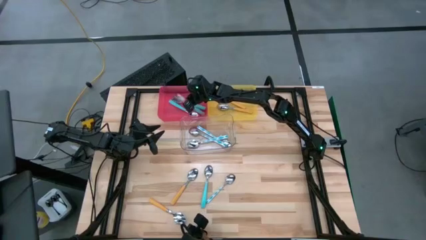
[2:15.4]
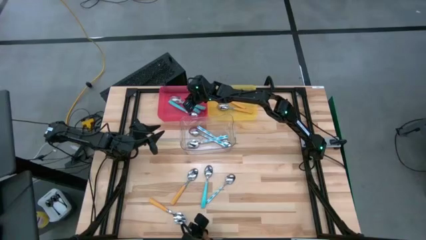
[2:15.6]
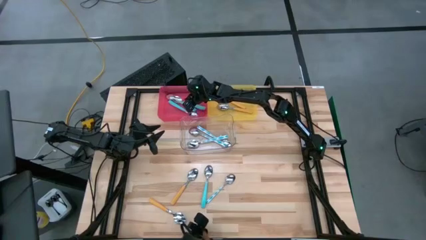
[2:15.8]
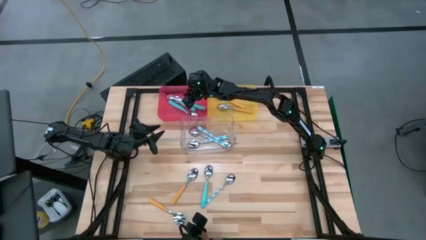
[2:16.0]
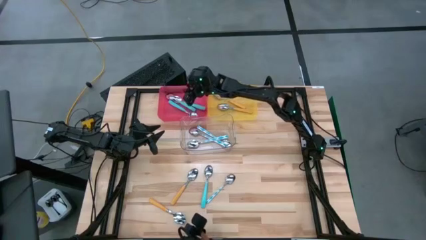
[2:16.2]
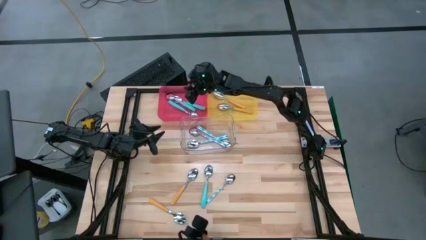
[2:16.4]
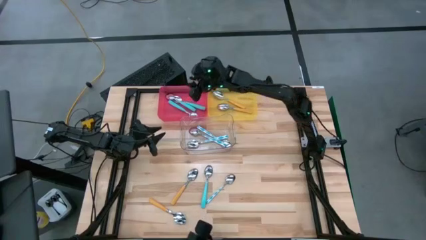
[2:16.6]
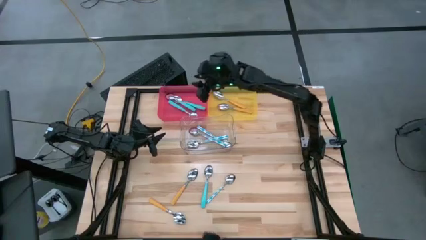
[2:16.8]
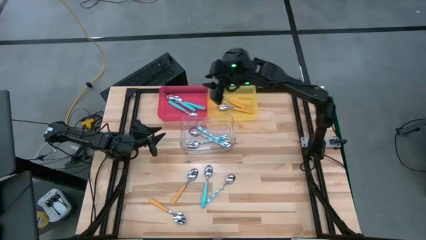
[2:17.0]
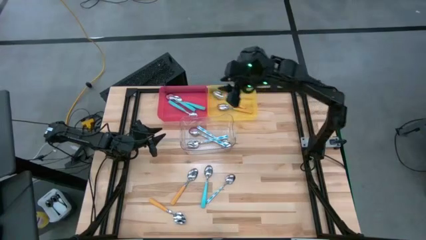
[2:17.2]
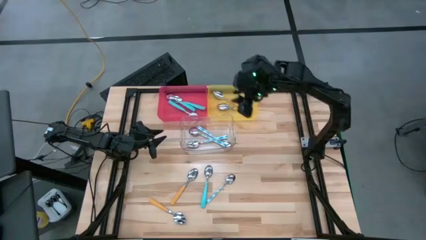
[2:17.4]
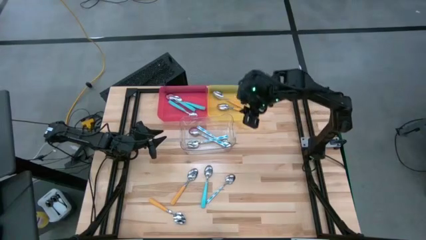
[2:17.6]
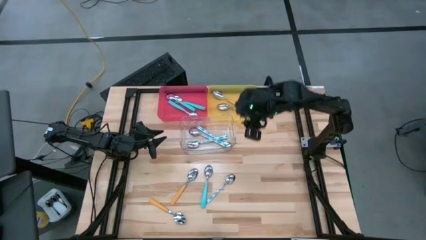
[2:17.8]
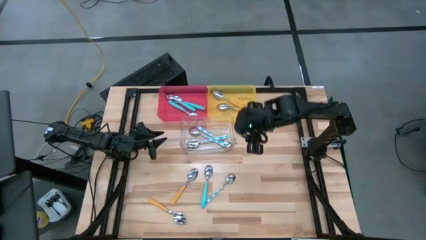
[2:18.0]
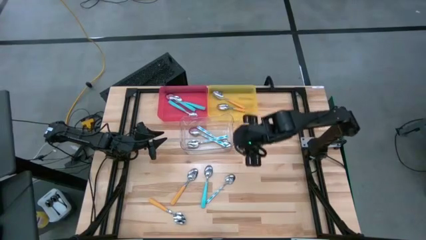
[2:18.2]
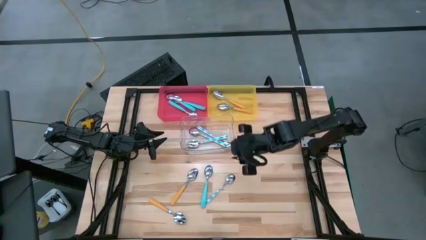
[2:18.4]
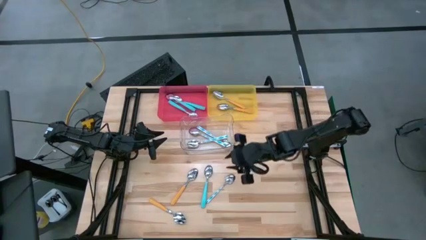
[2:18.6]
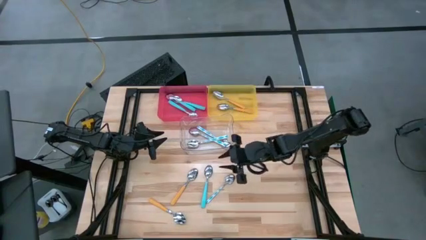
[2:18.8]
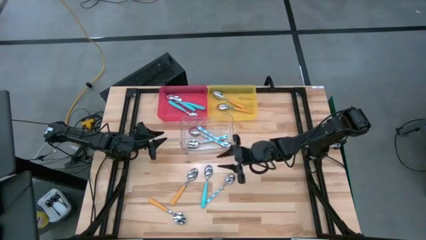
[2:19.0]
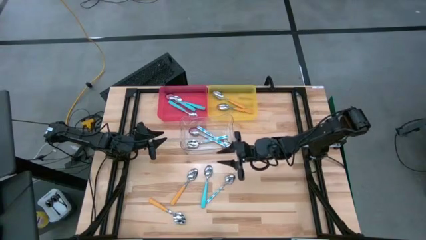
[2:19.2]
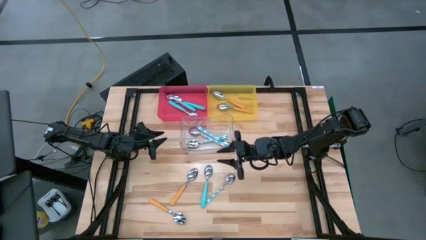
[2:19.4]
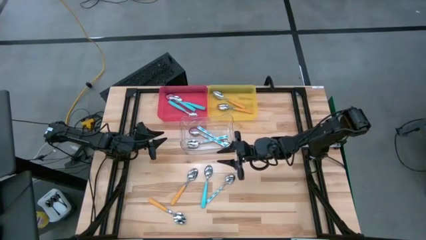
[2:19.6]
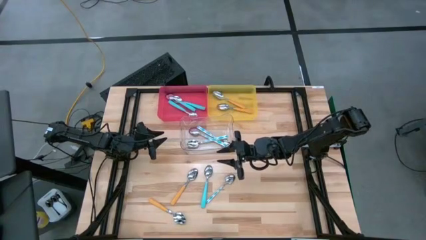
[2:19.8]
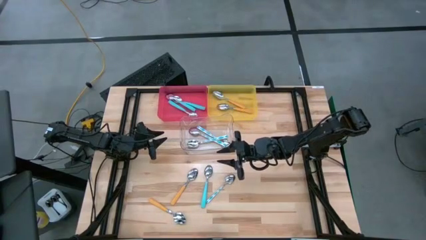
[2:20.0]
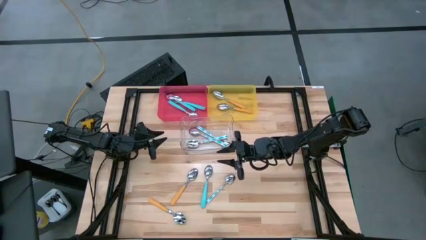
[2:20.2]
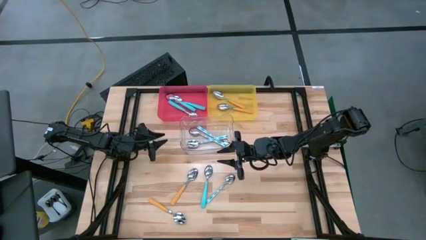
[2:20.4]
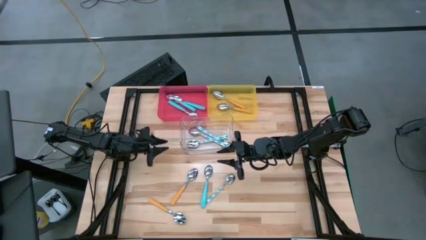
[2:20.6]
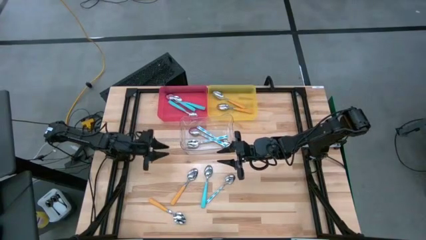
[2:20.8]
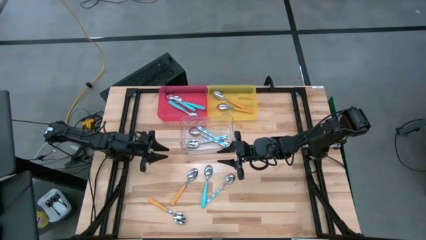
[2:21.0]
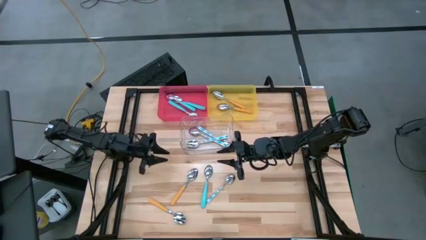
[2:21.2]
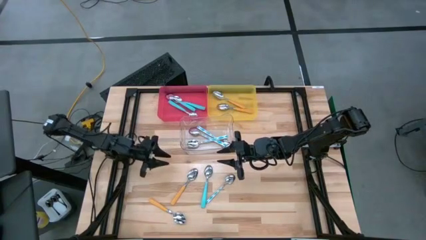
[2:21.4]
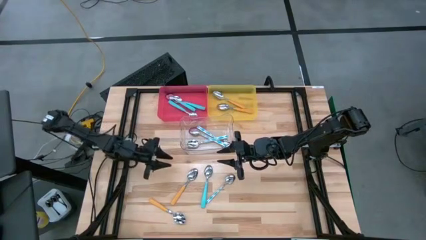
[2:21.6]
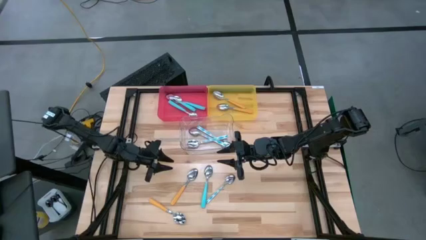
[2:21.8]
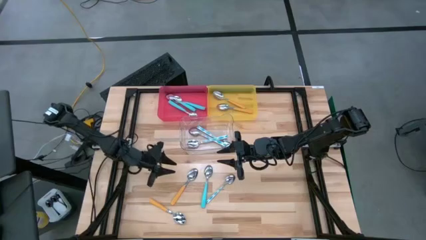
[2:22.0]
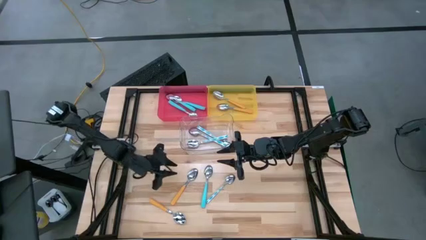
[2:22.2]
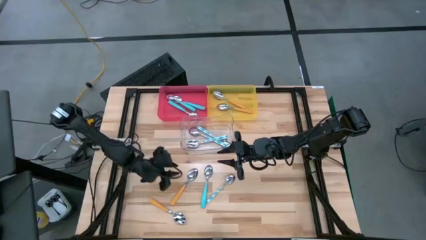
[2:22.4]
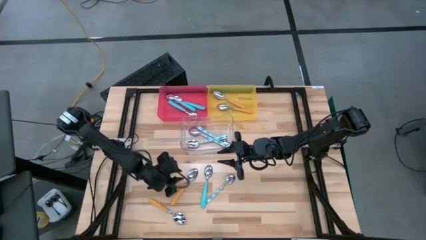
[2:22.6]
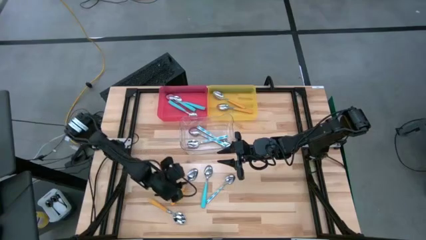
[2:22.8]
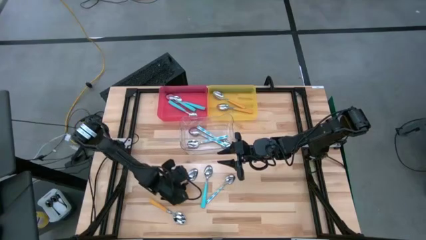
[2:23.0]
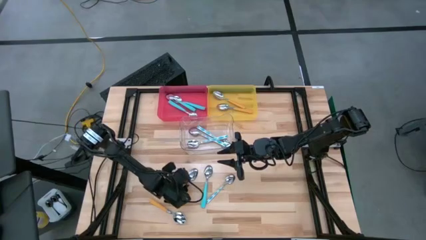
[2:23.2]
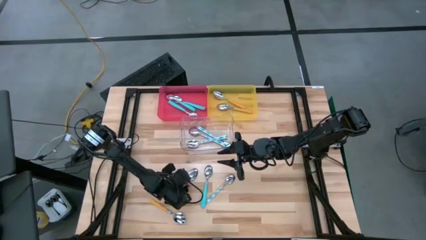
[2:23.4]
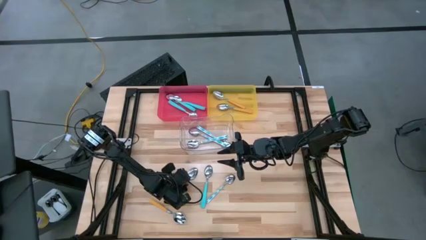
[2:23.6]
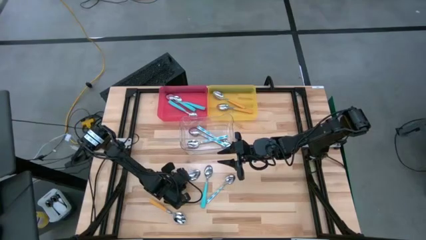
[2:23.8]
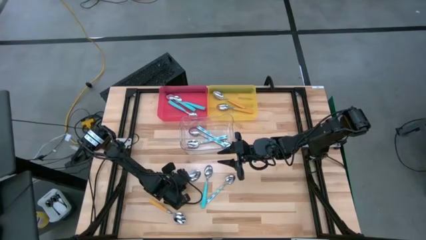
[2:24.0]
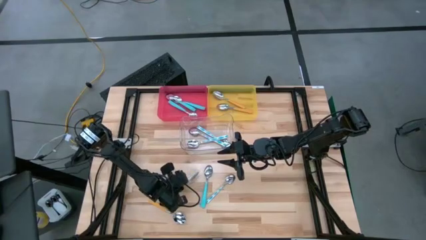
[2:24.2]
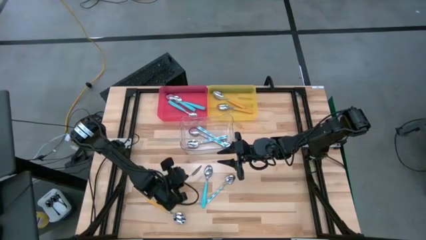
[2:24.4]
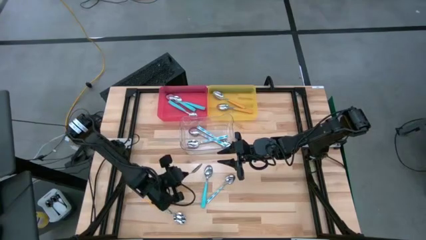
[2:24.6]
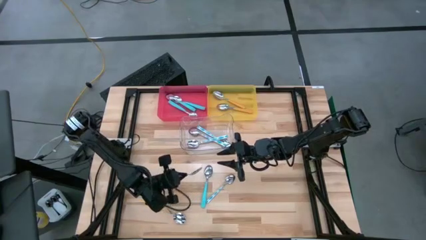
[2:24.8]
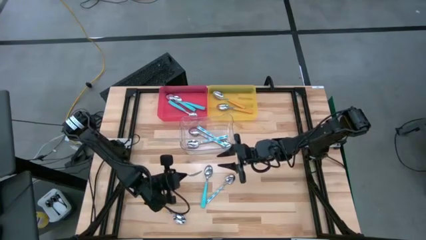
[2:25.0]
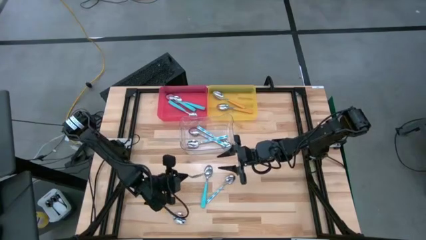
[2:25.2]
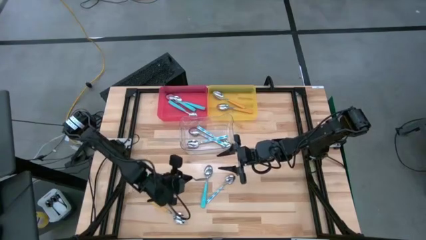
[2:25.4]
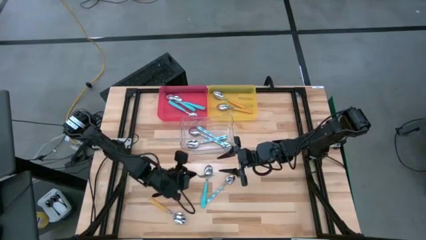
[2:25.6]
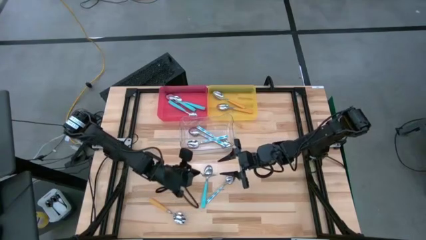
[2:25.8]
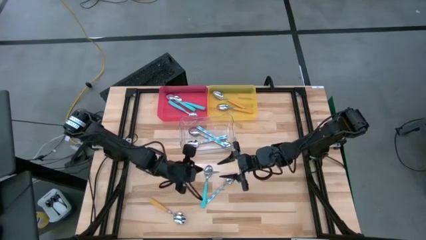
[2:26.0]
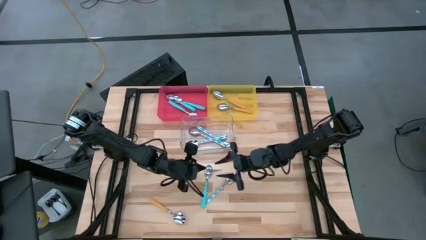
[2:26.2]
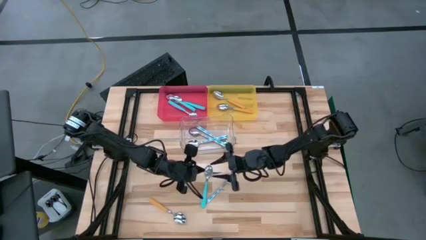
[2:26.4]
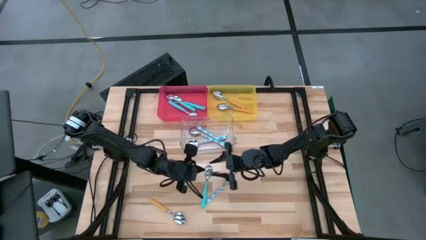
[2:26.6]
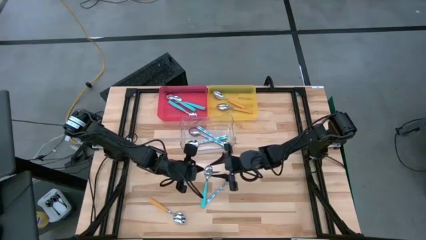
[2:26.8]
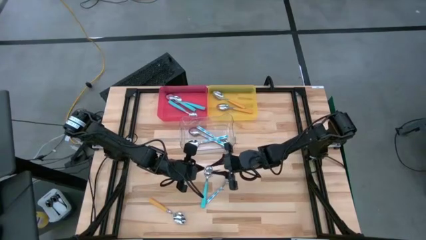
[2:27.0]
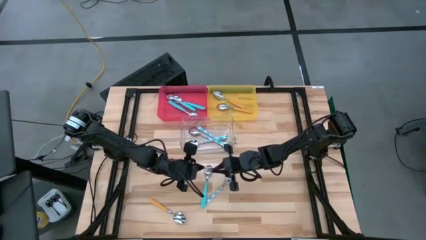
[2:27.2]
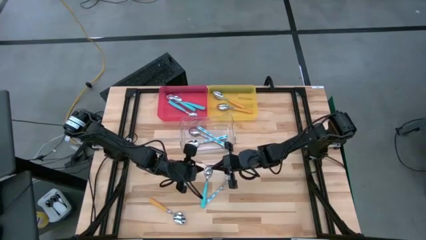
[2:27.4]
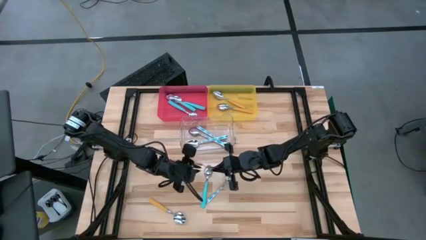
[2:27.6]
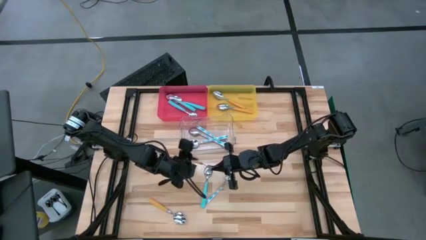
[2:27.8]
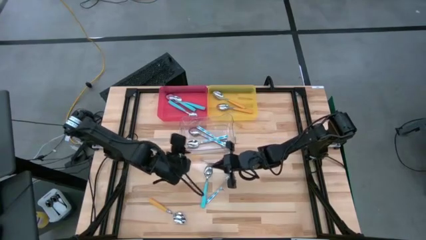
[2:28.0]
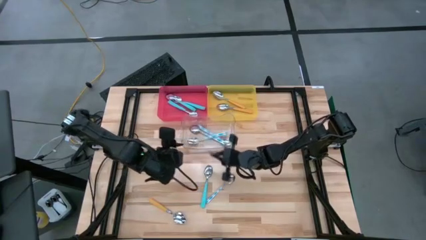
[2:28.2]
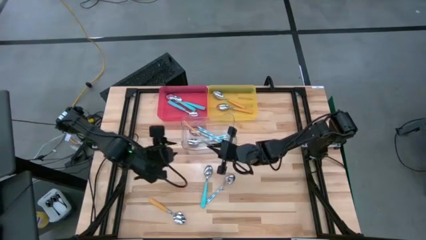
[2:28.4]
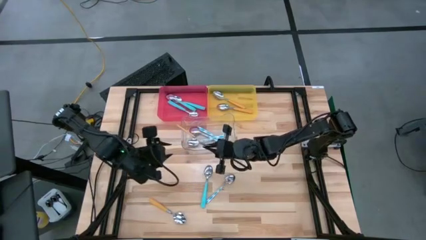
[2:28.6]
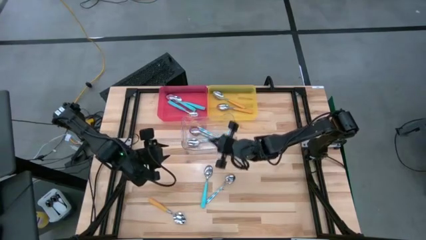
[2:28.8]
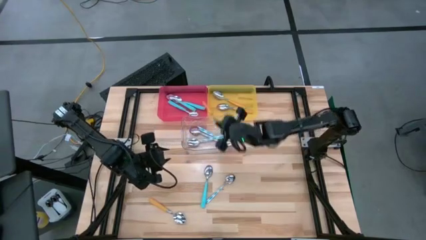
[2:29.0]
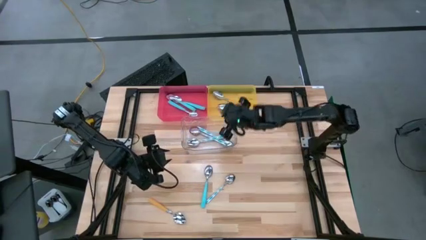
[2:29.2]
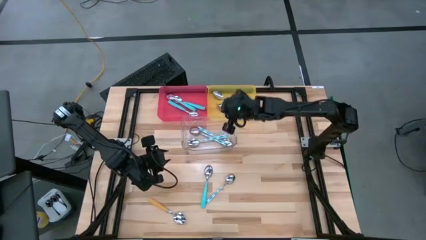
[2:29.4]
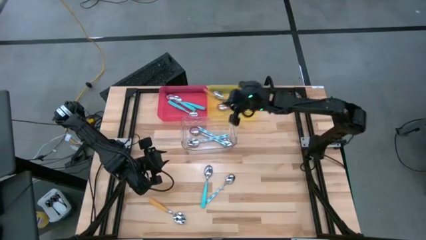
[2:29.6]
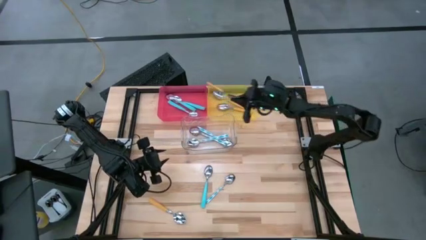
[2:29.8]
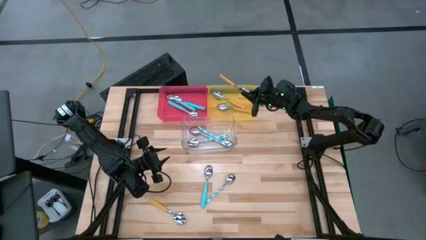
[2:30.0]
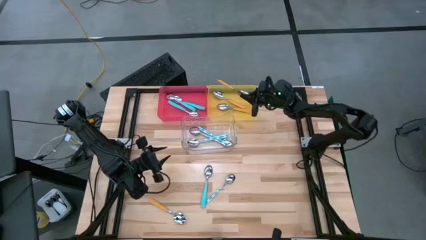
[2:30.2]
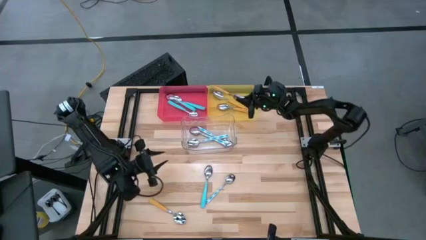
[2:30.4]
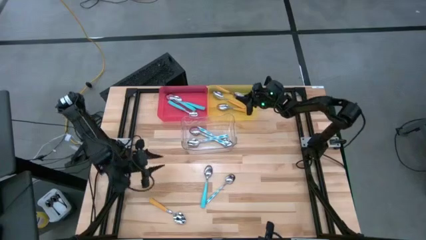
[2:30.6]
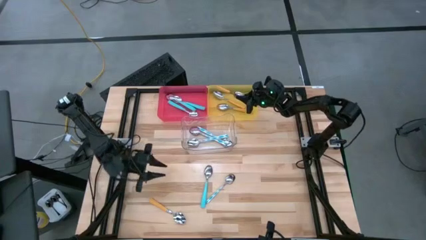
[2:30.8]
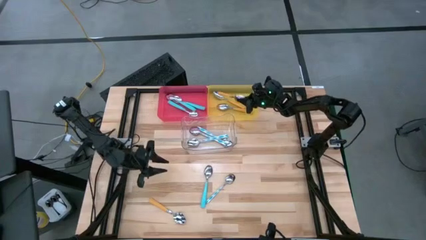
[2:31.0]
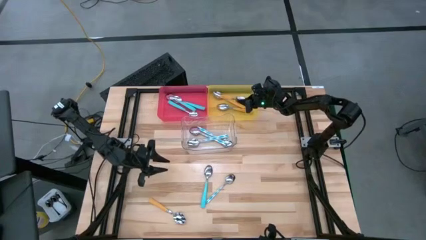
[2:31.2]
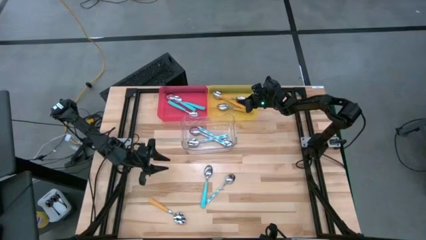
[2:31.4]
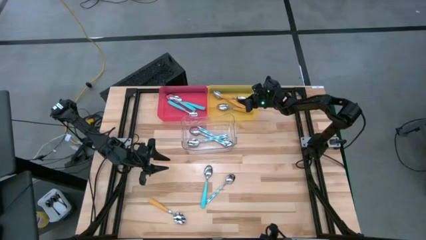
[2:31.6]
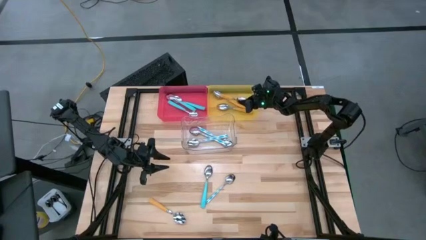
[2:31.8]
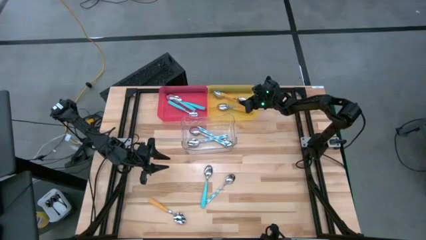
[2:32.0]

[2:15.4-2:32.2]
Task: Sort silverware by color (type)
Put the yellow spoon into the yellow bin
